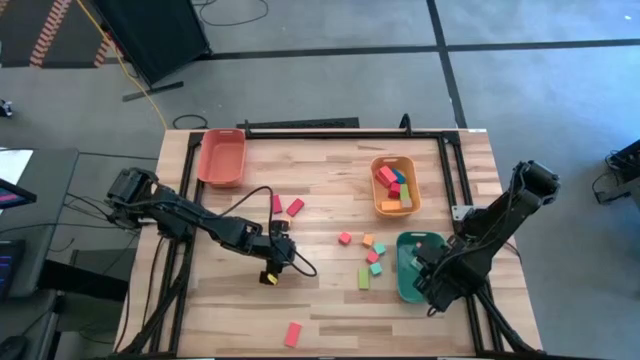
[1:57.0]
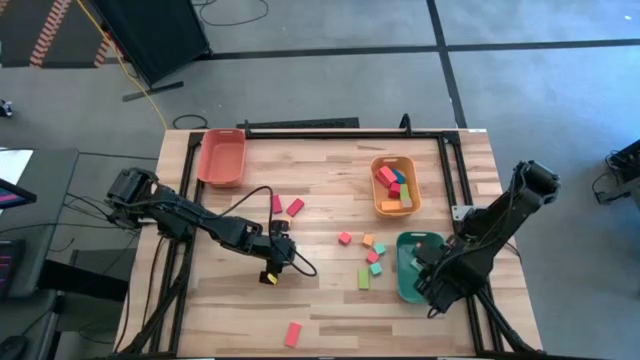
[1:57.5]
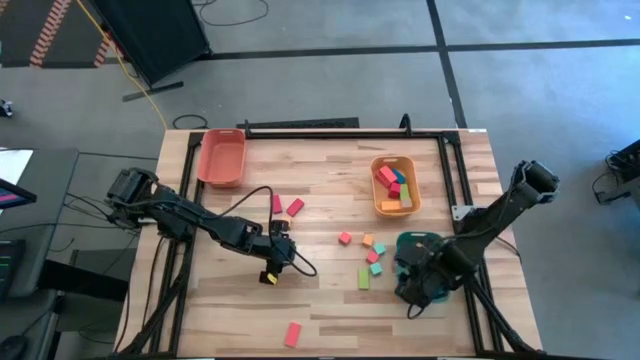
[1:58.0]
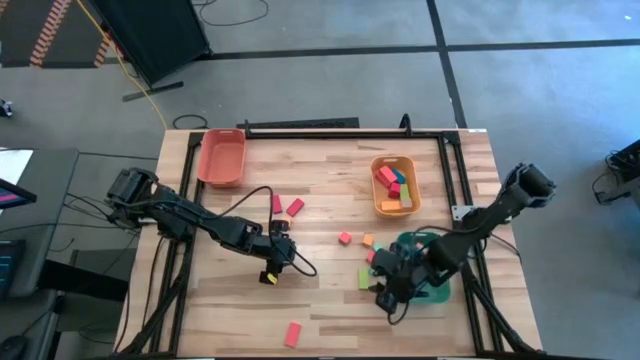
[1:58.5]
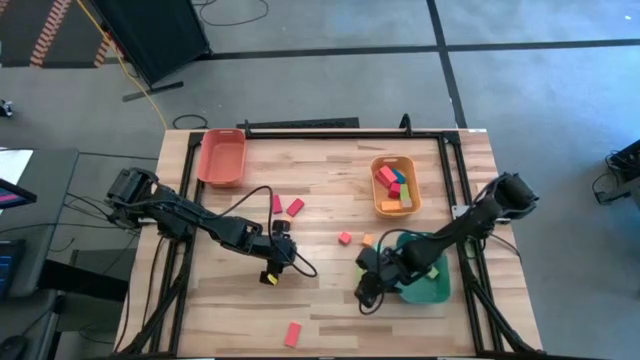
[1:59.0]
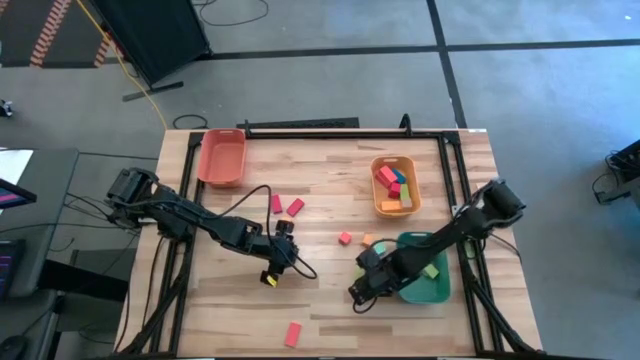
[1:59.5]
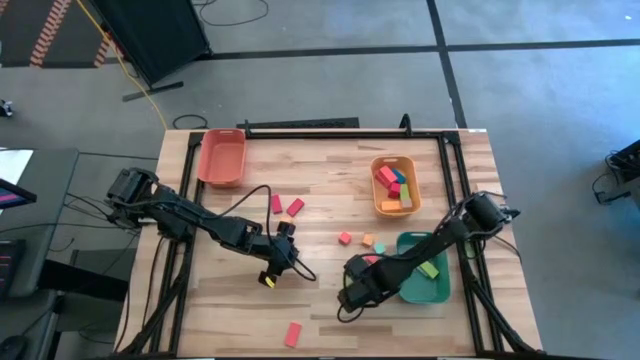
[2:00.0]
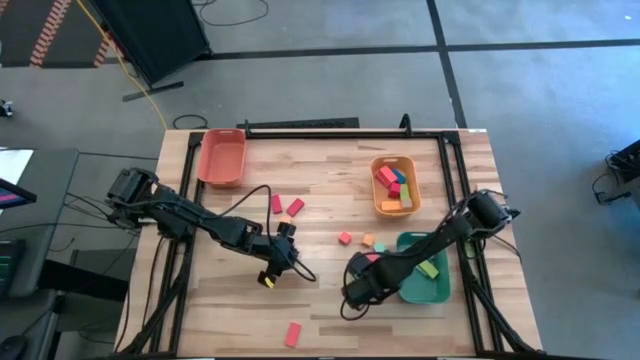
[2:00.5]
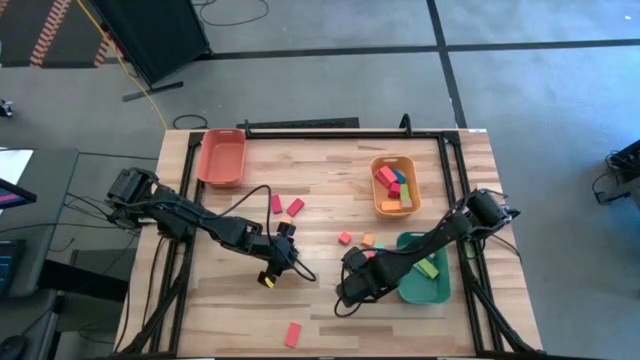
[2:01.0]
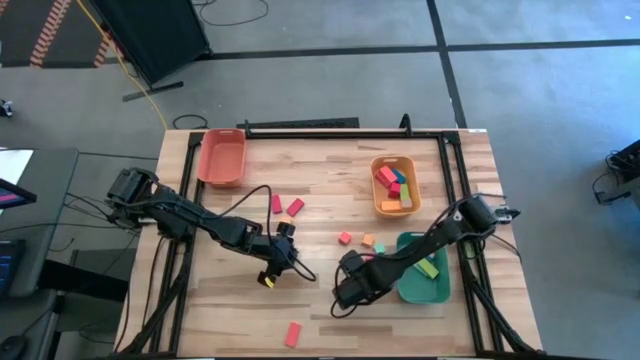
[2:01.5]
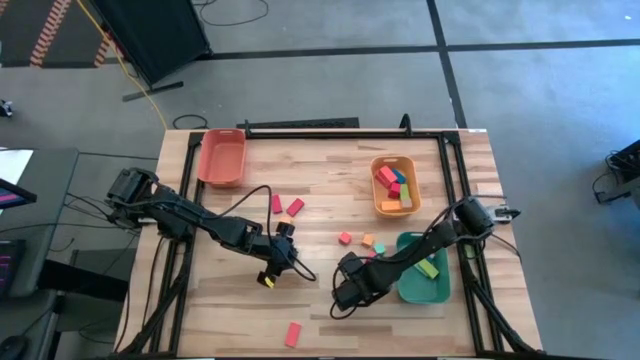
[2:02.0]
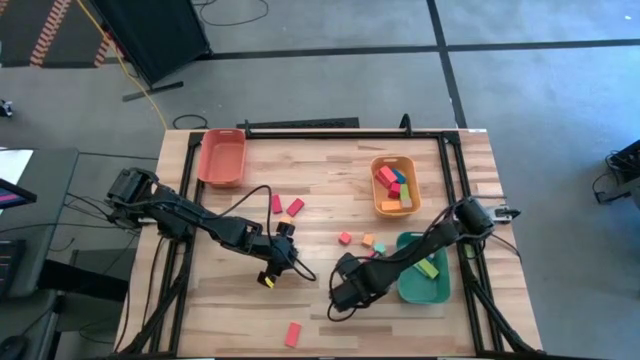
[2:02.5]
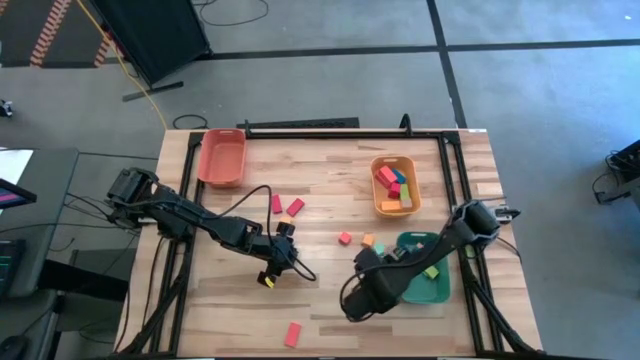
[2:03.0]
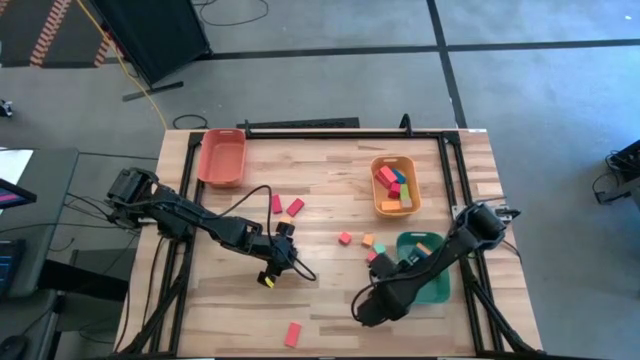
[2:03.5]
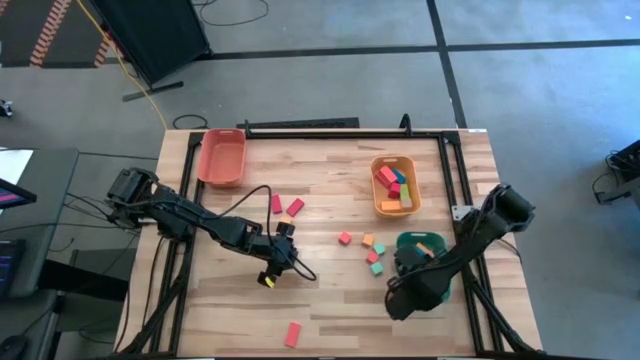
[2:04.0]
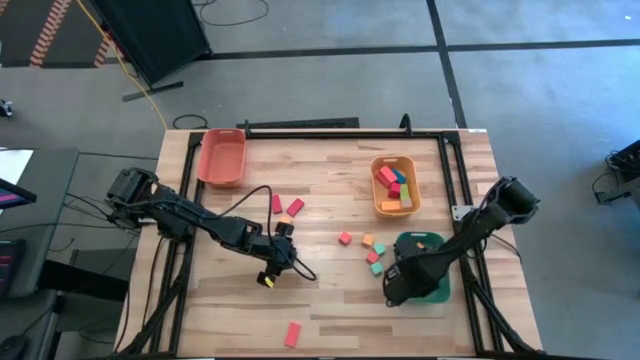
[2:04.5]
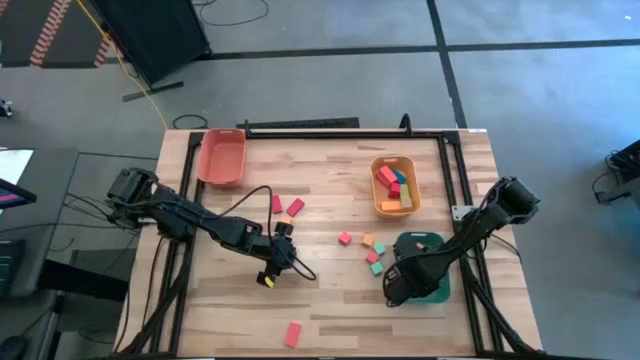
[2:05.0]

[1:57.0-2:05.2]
Task: Sort blocks by size
Put the small rectangular green block into the green bin

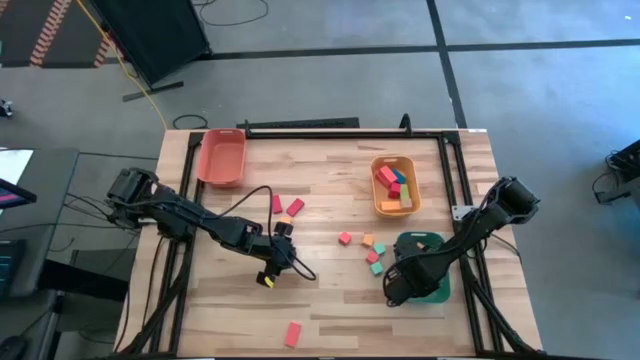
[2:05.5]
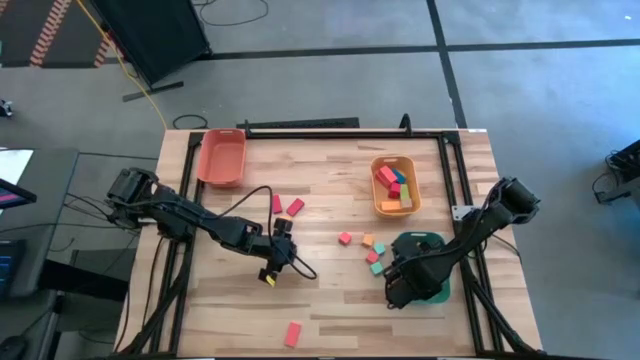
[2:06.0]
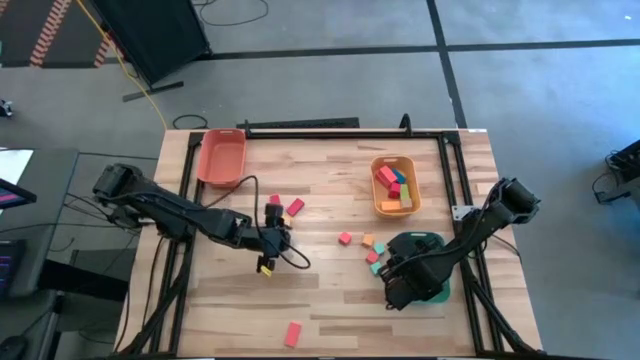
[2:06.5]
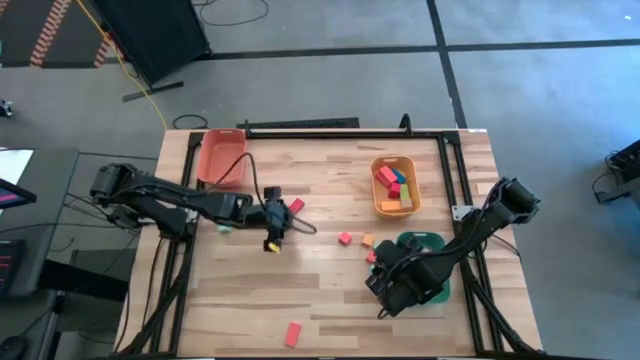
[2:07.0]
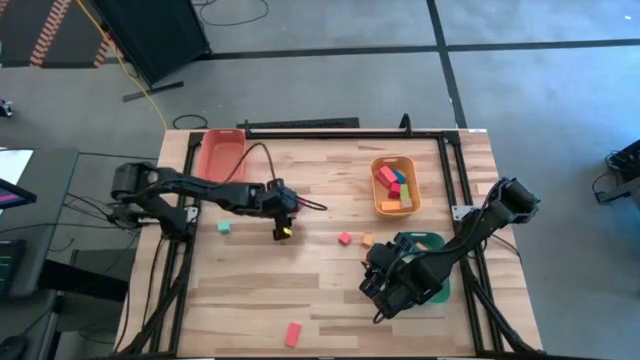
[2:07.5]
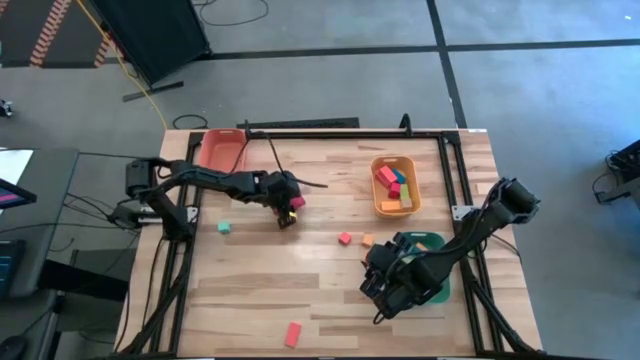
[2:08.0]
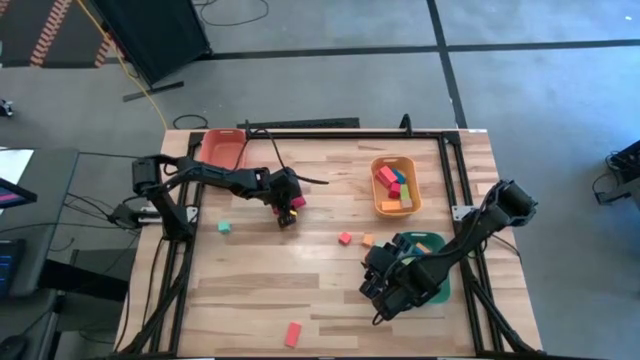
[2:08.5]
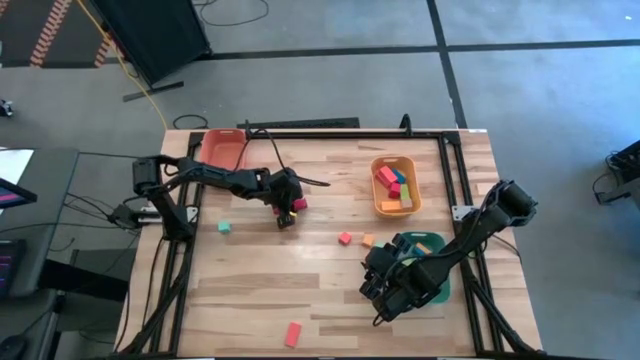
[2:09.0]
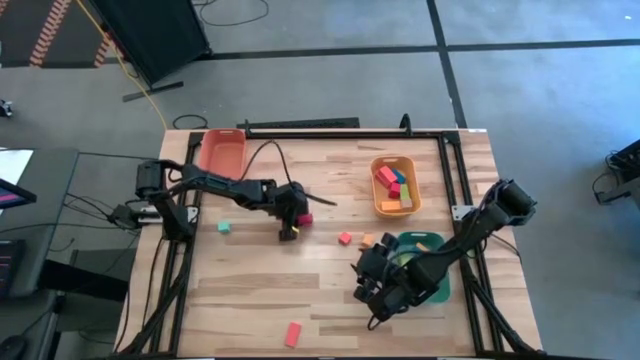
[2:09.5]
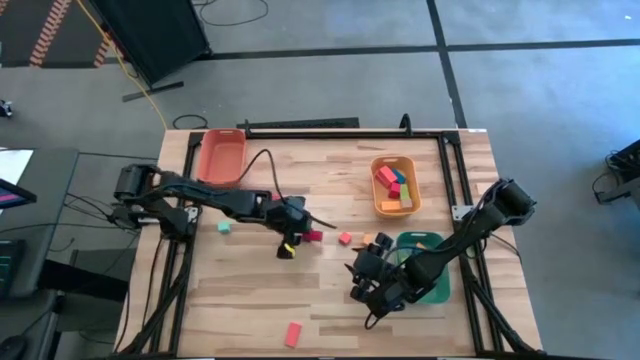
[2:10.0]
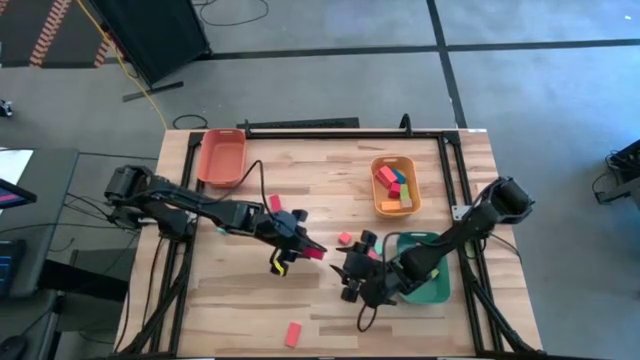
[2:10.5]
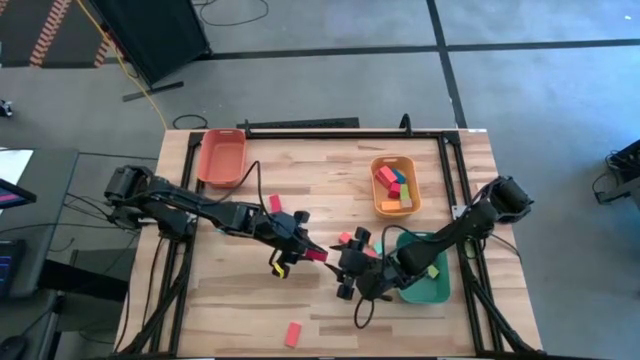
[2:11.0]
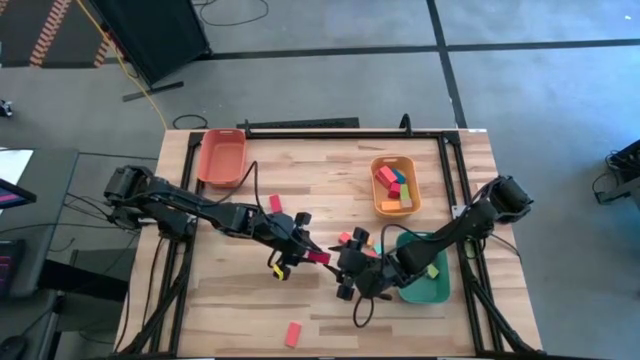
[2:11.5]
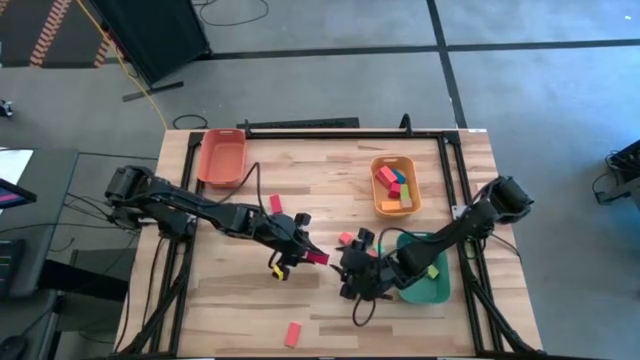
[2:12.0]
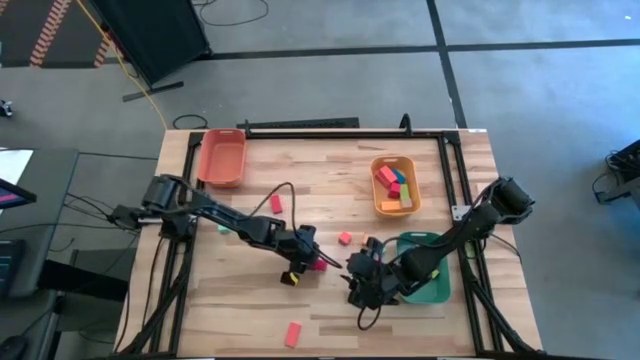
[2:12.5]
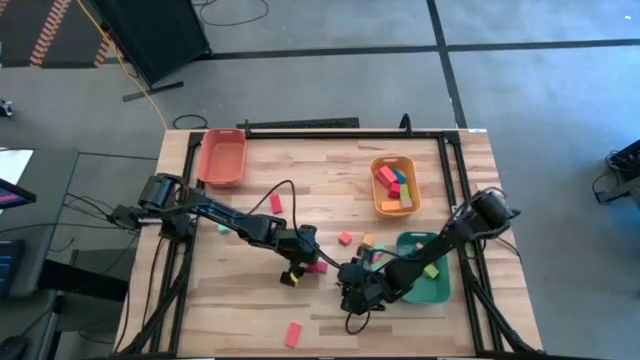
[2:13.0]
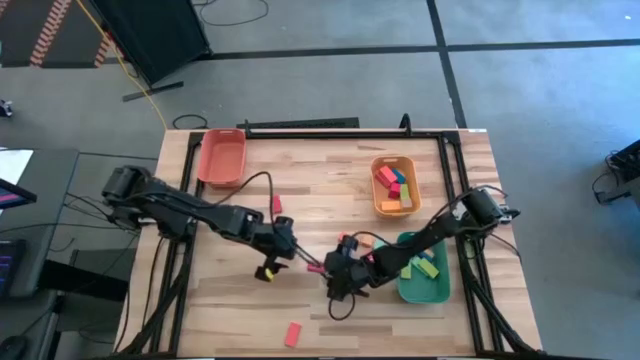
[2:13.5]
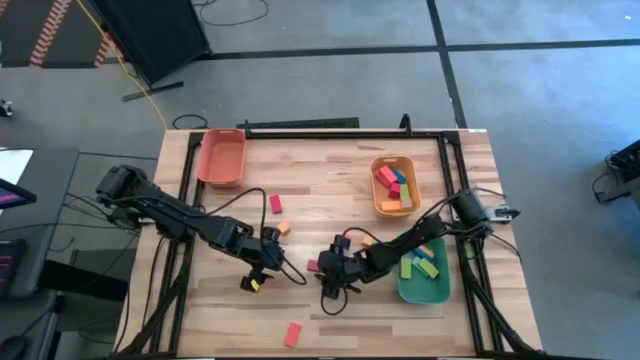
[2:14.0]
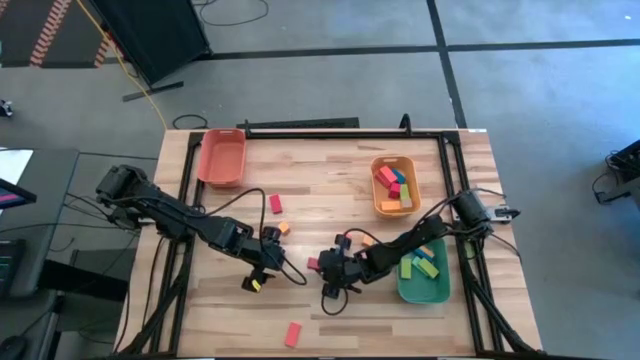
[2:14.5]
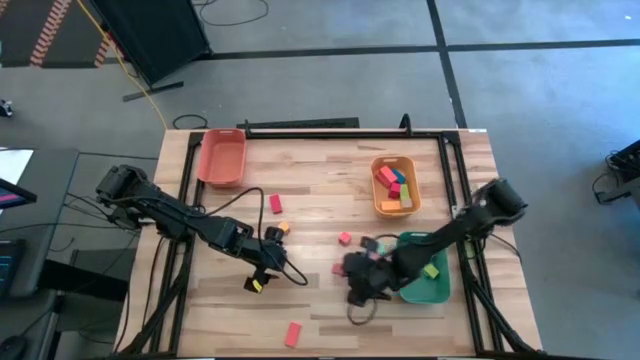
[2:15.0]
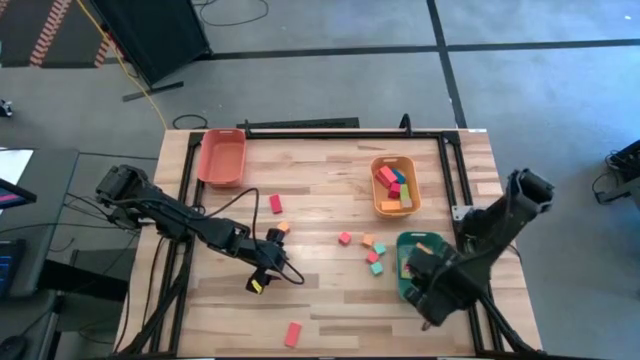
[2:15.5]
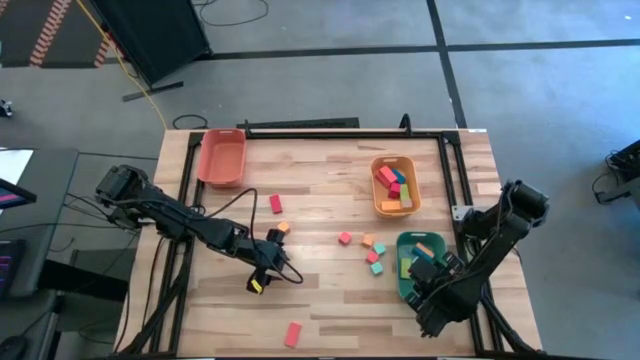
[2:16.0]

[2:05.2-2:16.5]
Put the right small rectangular red block into the green bin
